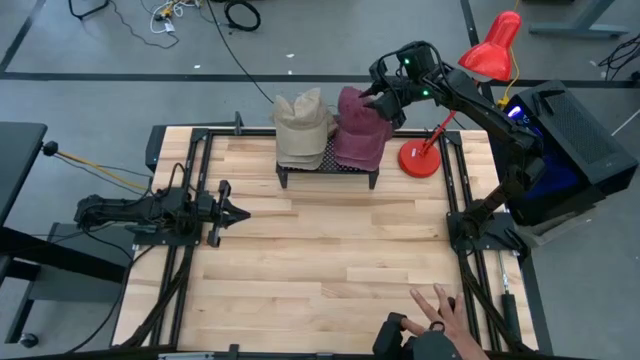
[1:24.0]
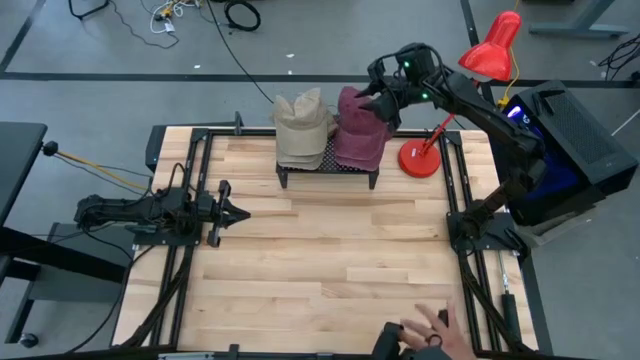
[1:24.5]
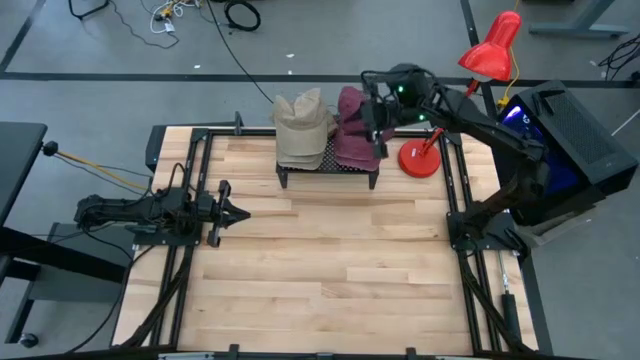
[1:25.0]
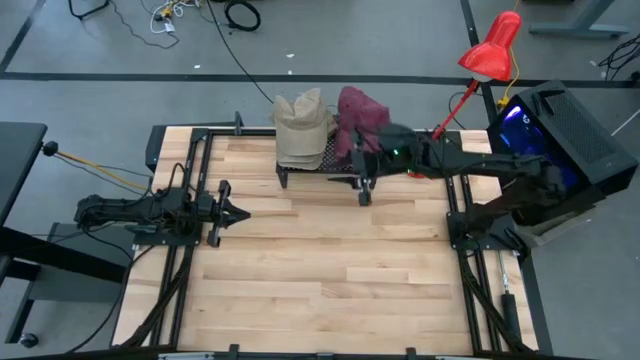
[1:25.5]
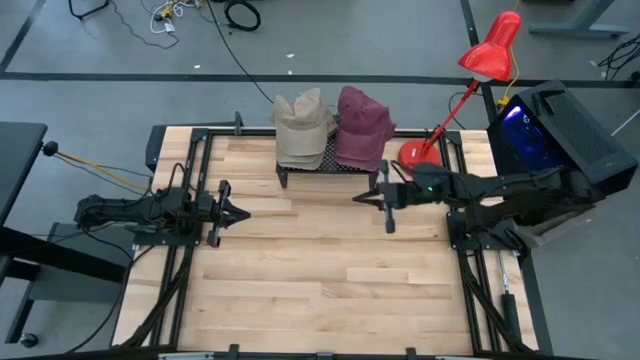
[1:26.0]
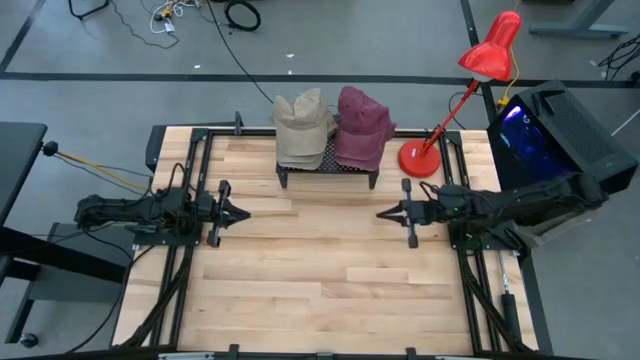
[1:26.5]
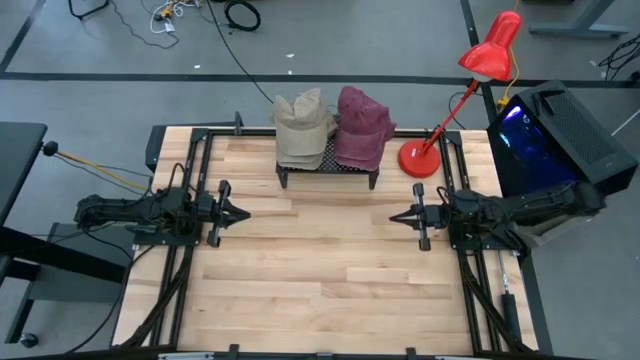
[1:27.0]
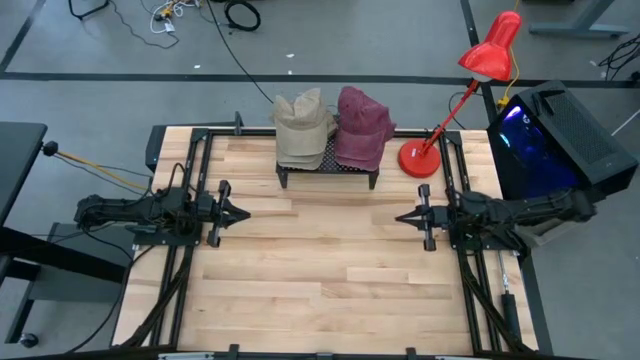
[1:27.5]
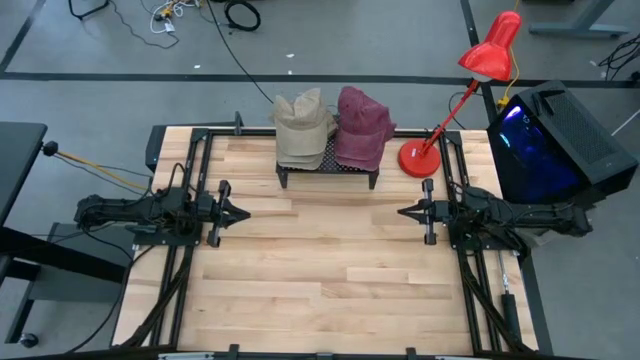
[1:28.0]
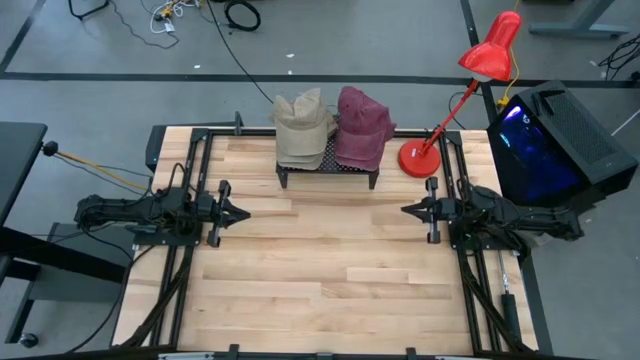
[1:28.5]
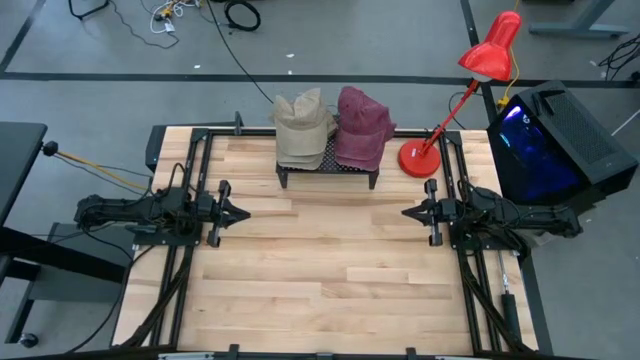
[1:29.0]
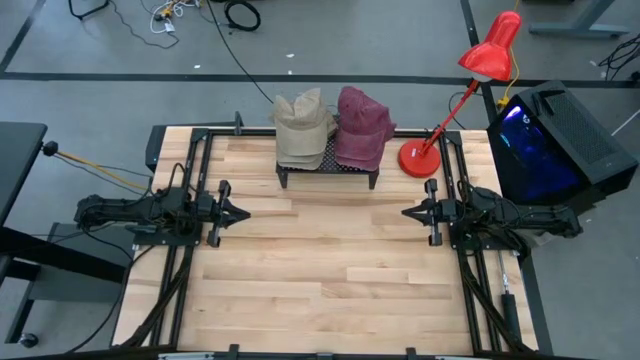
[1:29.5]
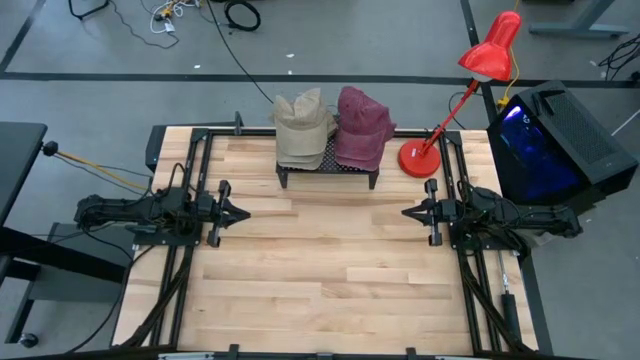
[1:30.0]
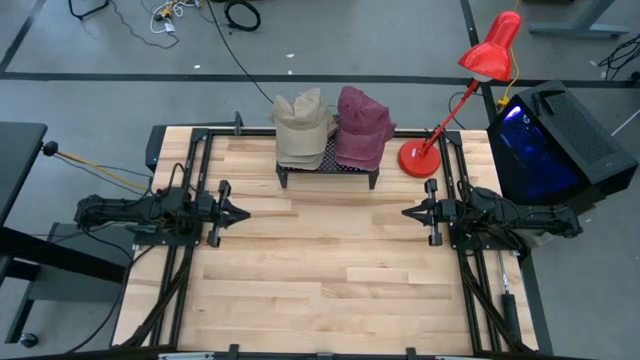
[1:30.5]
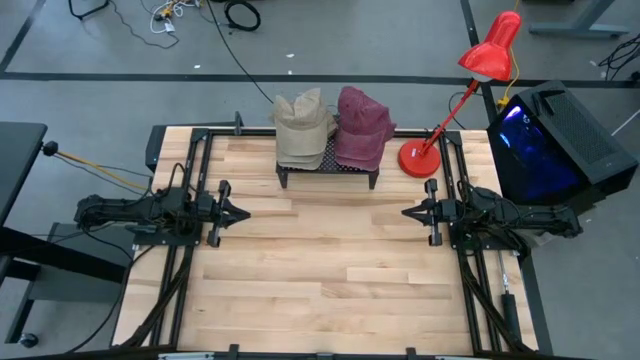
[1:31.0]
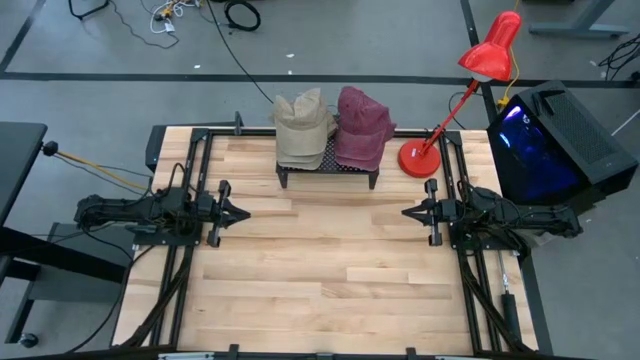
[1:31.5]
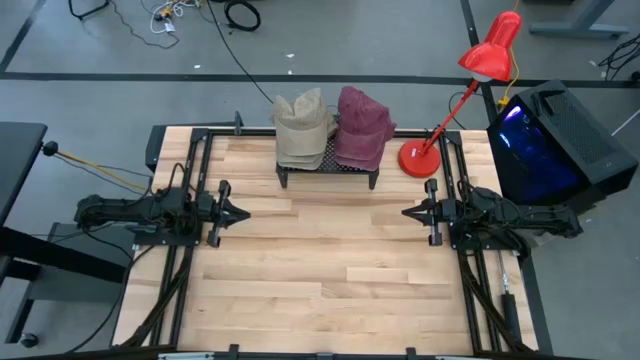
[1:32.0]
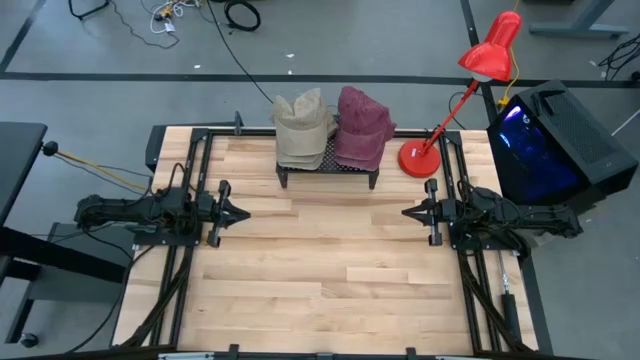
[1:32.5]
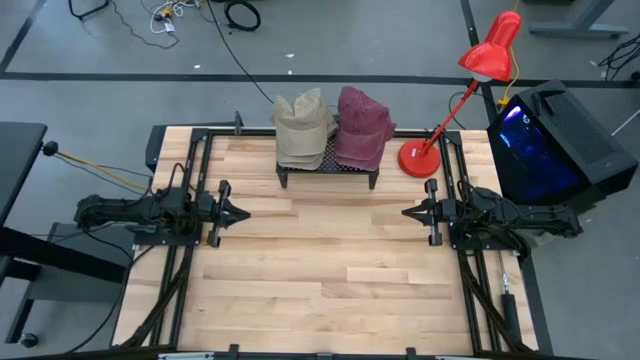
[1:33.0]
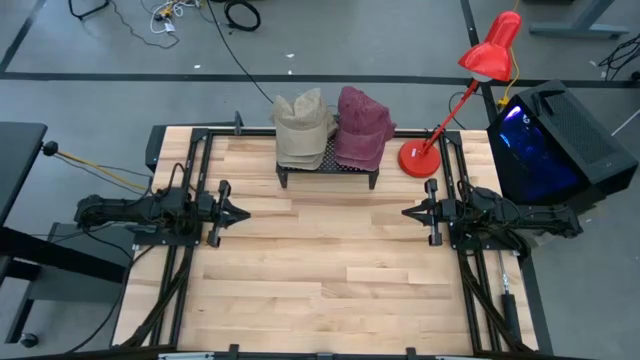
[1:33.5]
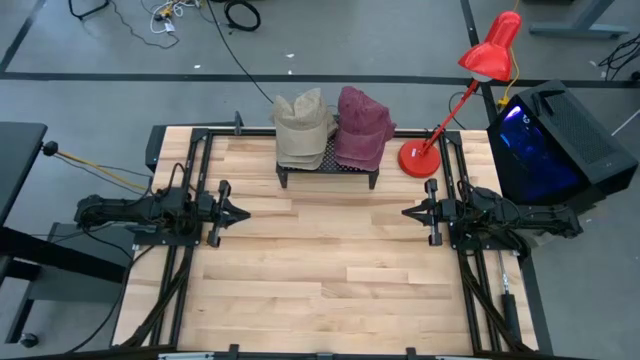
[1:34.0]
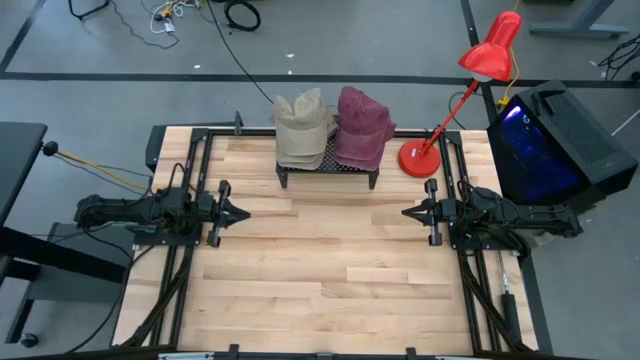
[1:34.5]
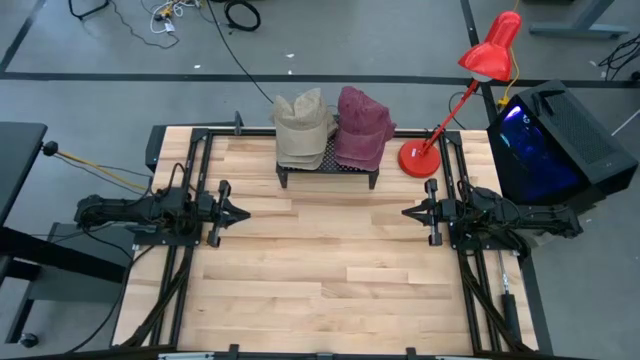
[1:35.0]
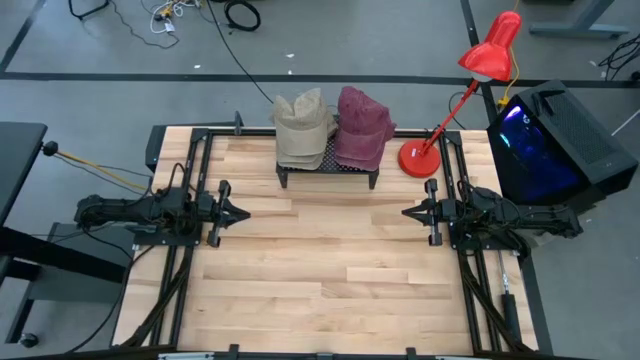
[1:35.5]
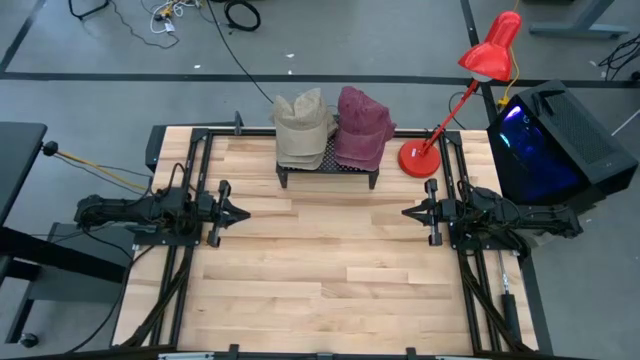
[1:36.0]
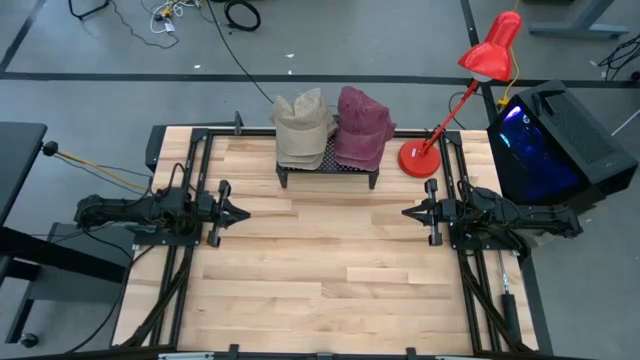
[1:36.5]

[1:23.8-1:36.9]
Task: Pick & Place hat
Return to Home Position

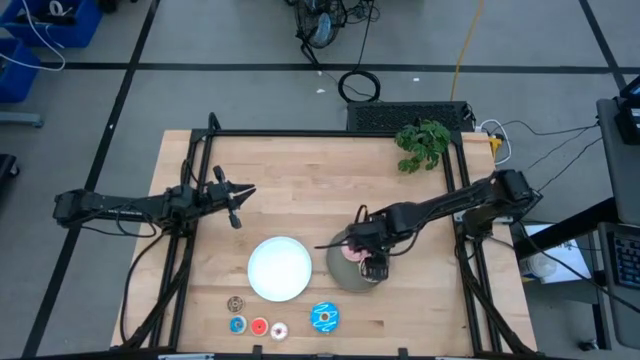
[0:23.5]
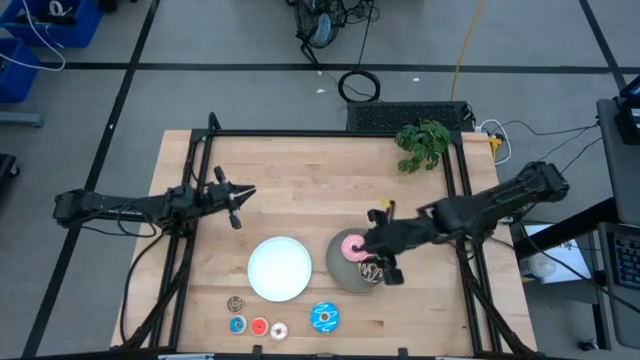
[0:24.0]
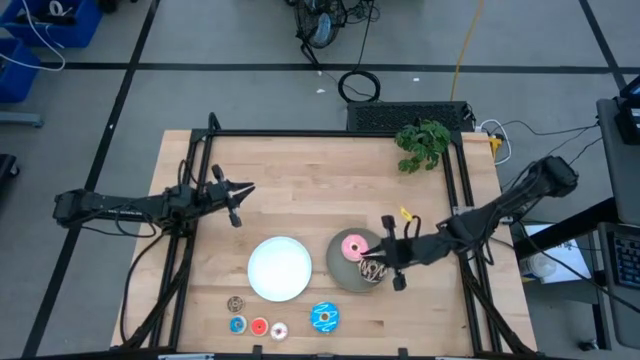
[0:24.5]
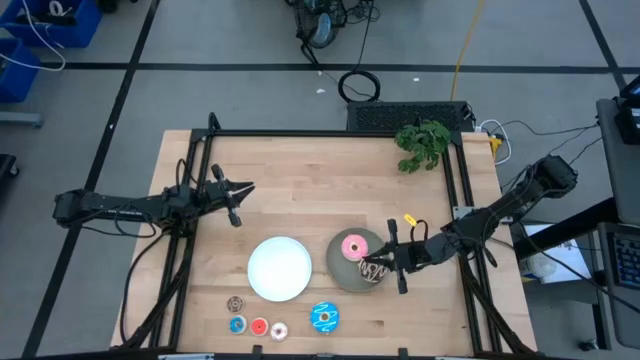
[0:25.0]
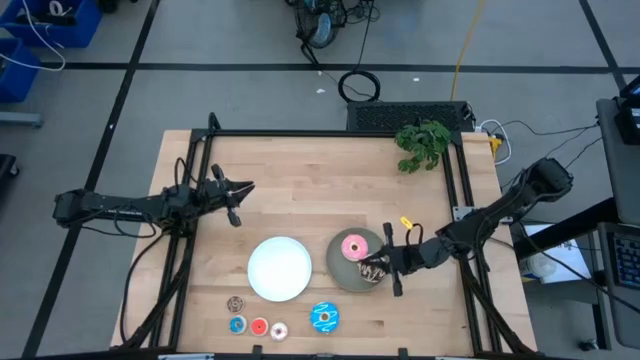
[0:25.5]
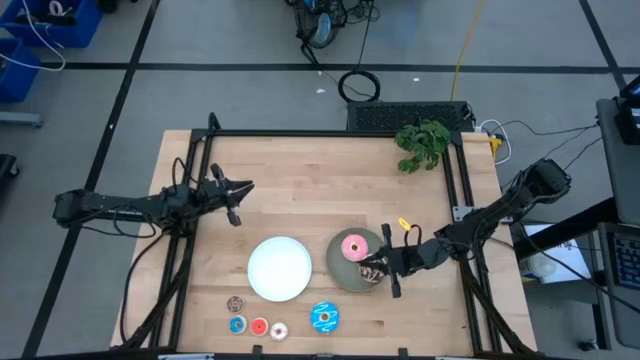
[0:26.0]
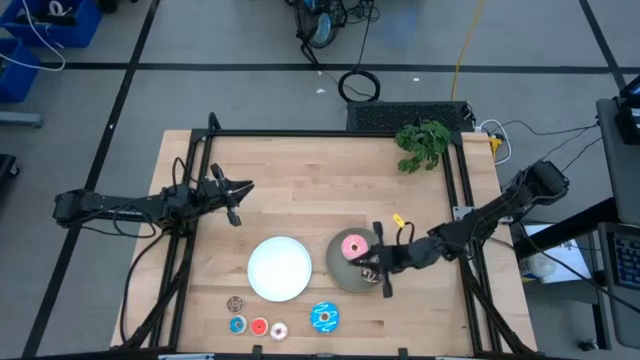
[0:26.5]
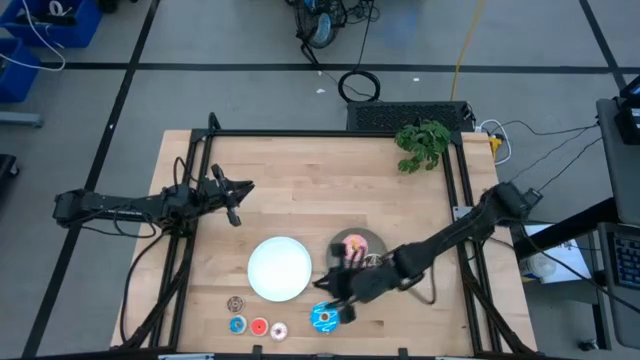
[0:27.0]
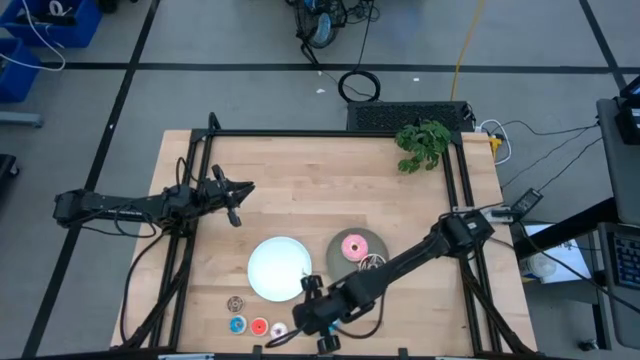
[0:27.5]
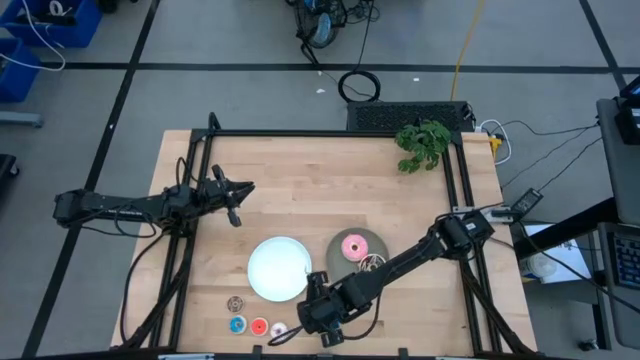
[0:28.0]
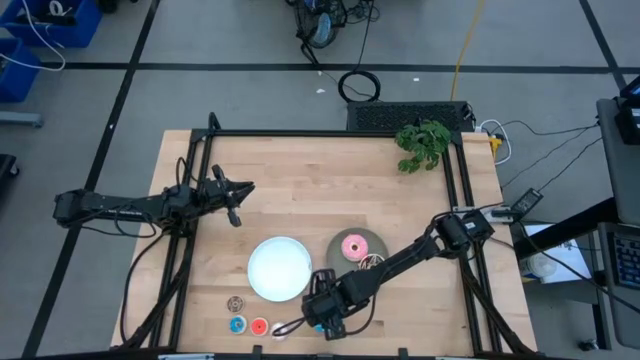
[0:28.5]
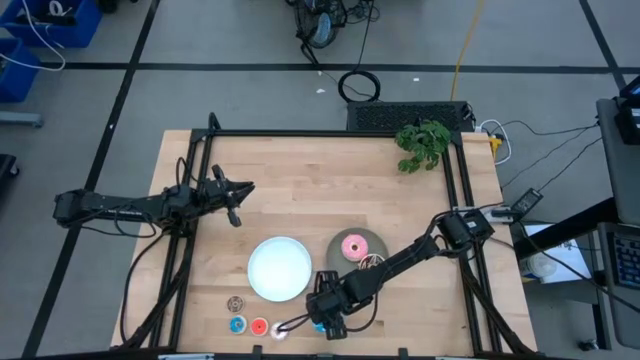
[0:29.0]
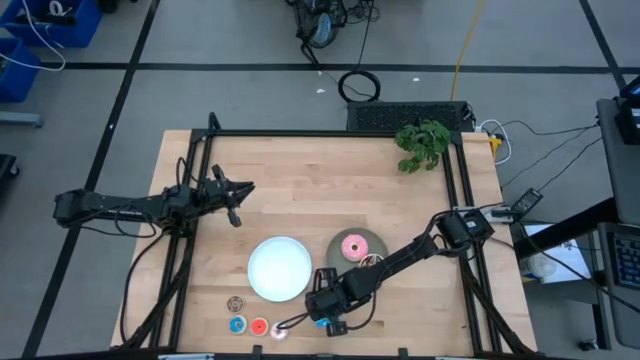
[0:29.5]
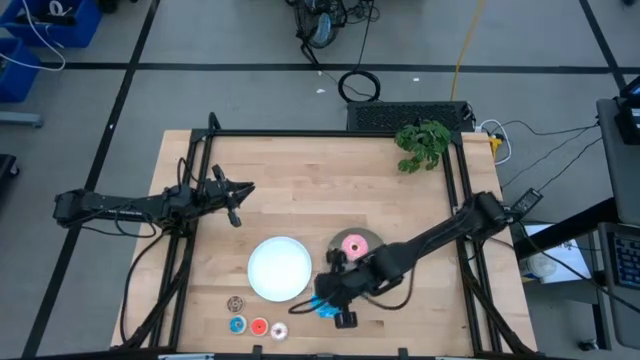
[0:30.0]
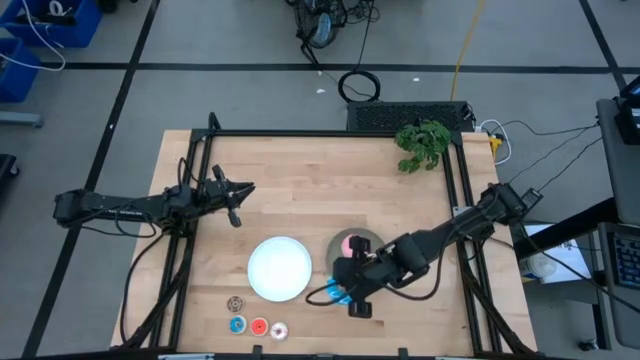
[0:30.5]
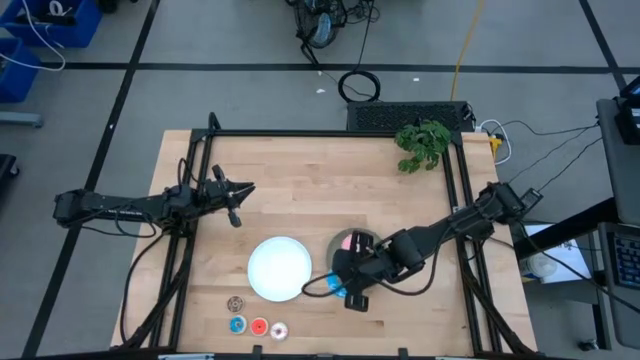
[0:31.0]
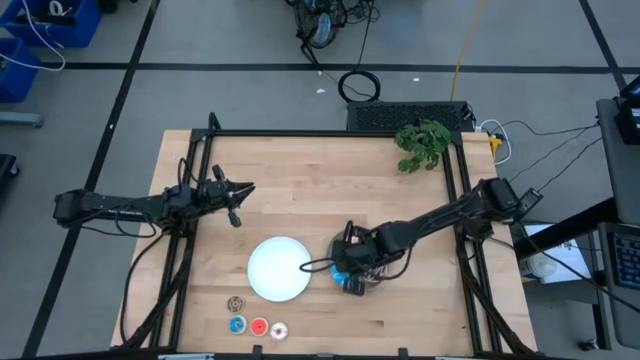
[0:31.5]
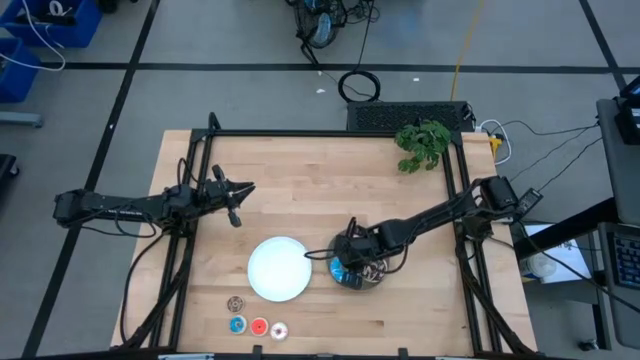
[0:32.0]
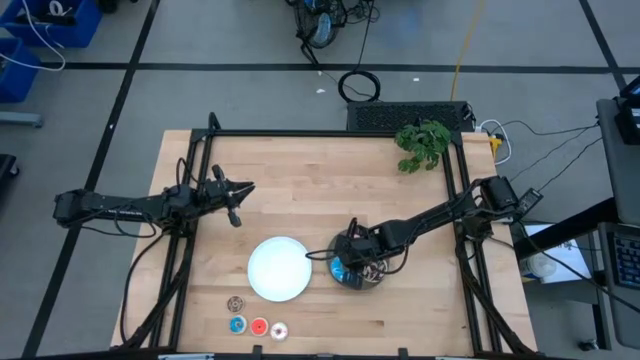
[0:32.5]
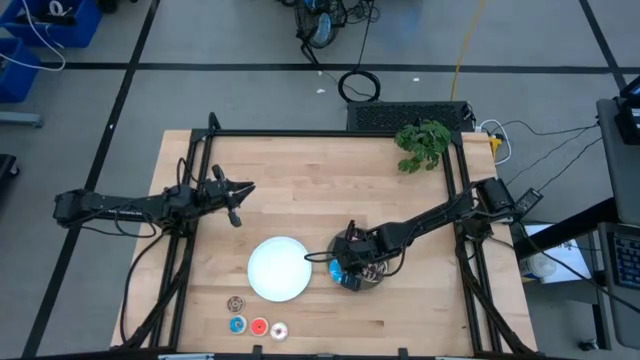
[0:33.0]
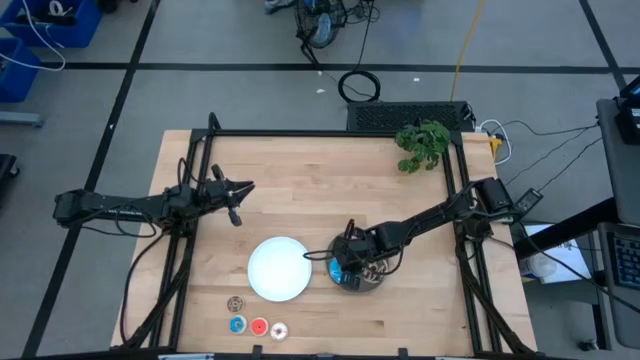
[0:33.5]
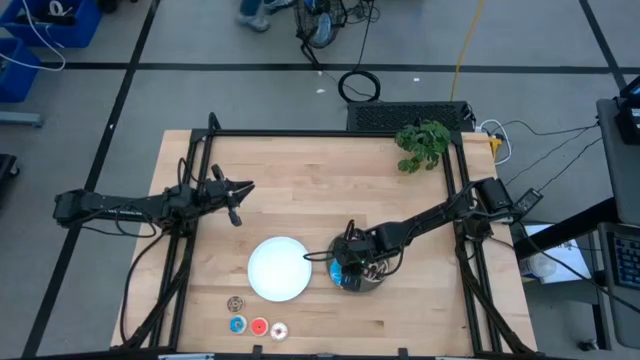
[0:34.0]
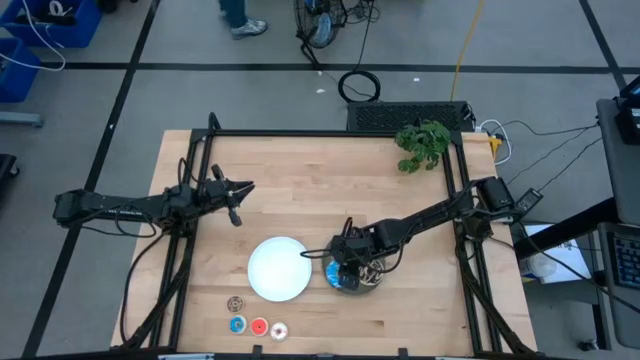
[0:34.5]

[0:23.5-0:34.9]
Task: Pick & Place donuts
Put the large blue donut on the gray plate
